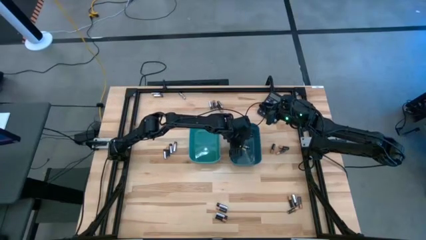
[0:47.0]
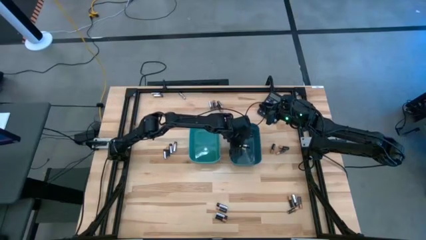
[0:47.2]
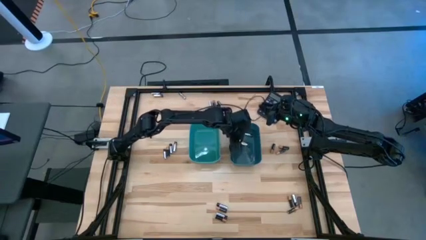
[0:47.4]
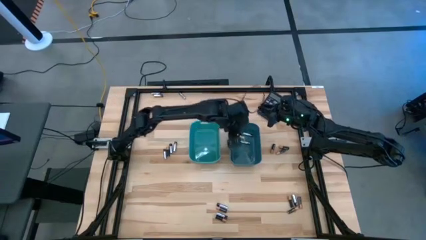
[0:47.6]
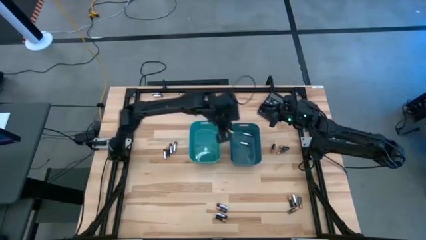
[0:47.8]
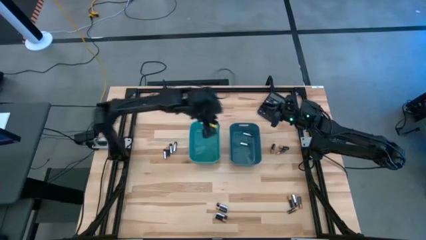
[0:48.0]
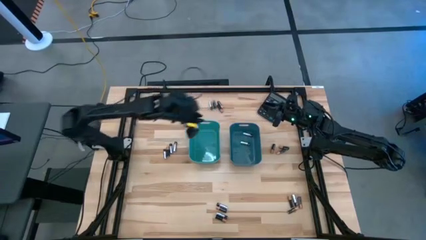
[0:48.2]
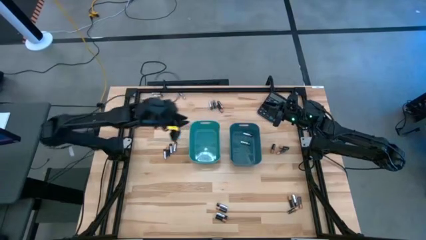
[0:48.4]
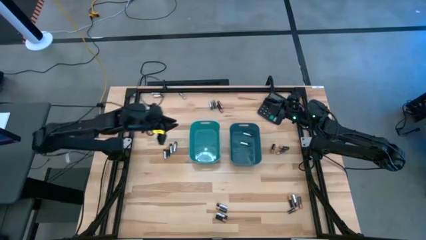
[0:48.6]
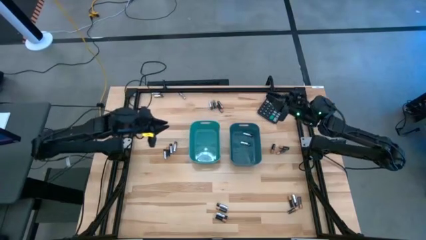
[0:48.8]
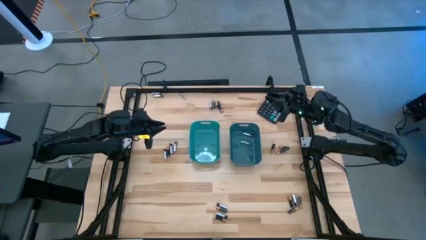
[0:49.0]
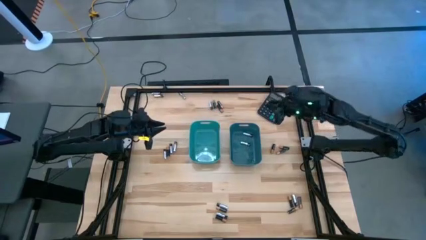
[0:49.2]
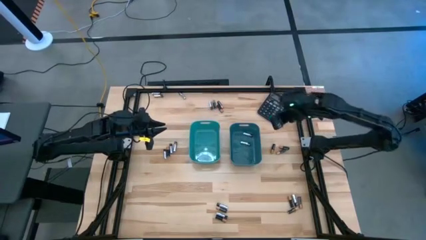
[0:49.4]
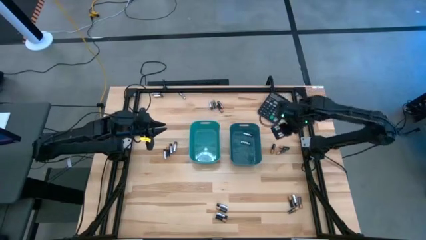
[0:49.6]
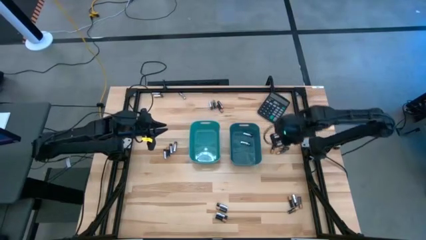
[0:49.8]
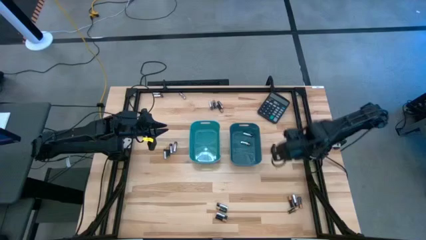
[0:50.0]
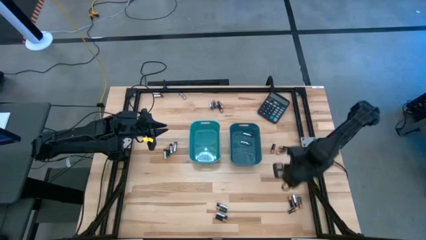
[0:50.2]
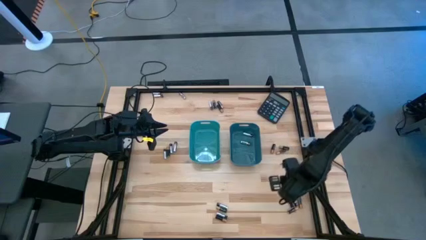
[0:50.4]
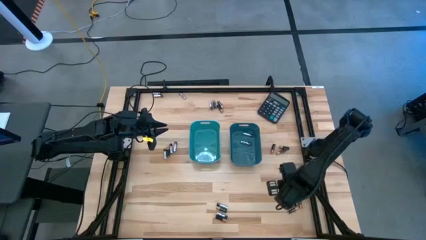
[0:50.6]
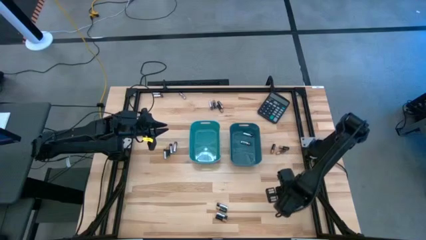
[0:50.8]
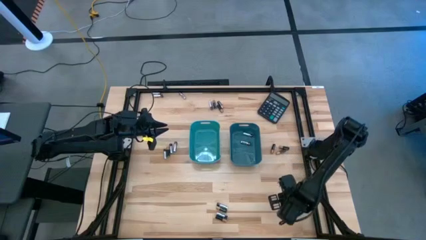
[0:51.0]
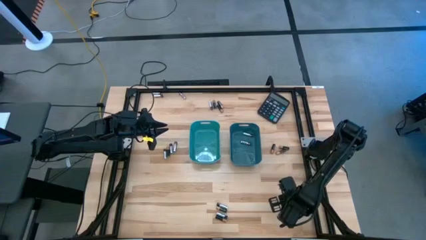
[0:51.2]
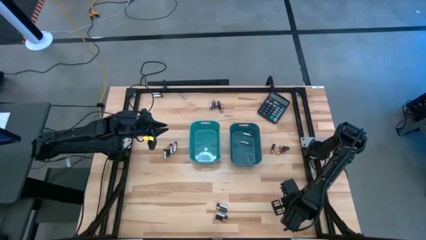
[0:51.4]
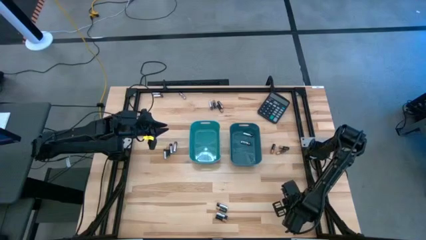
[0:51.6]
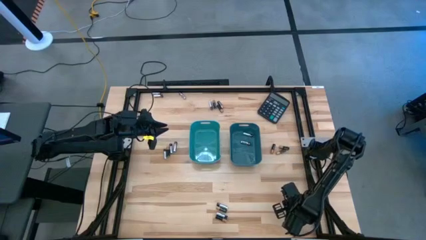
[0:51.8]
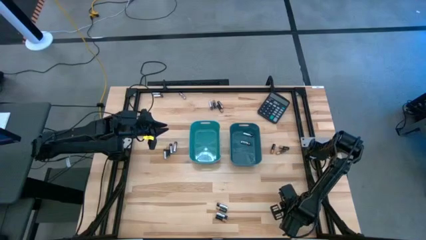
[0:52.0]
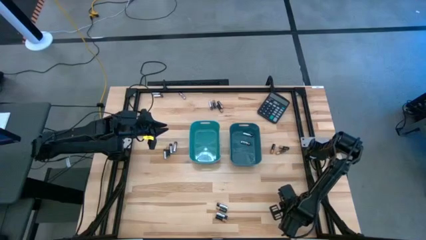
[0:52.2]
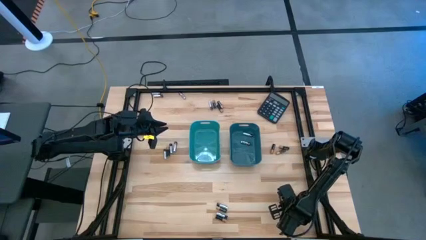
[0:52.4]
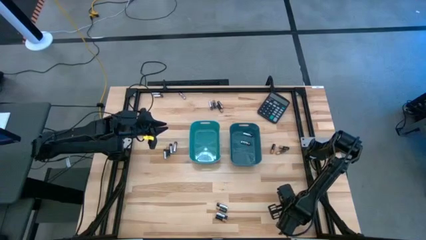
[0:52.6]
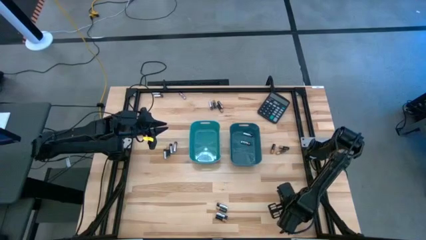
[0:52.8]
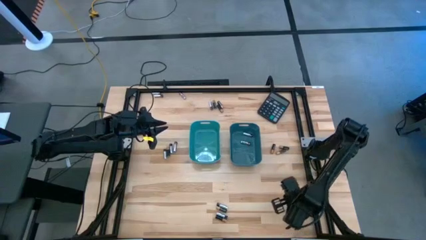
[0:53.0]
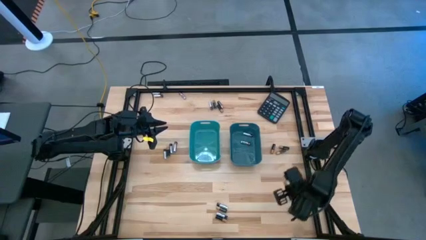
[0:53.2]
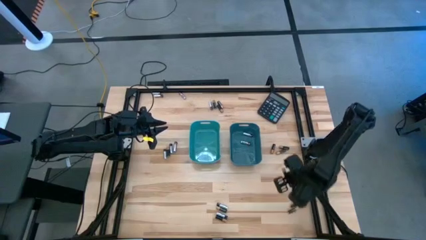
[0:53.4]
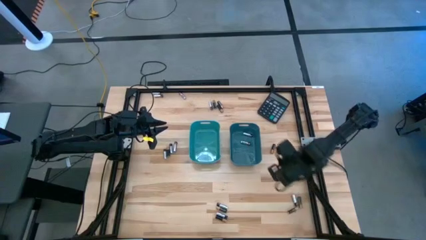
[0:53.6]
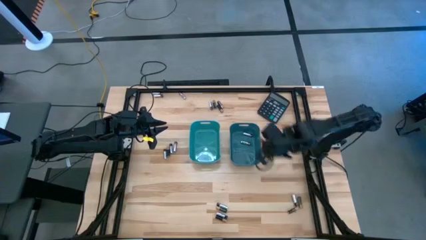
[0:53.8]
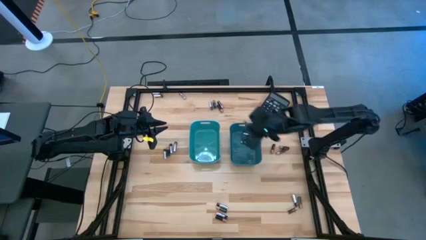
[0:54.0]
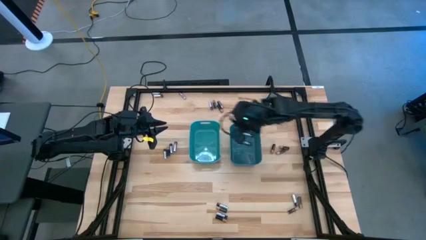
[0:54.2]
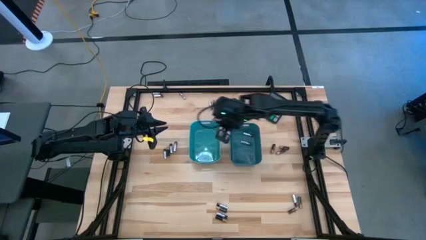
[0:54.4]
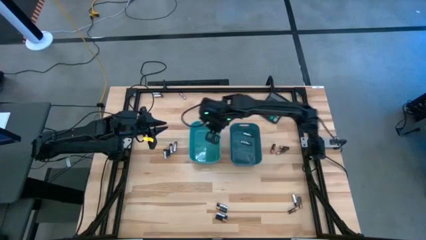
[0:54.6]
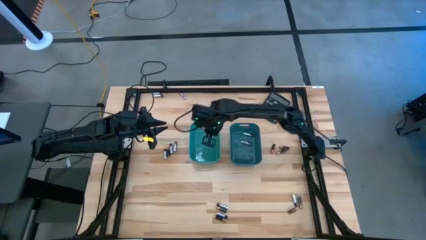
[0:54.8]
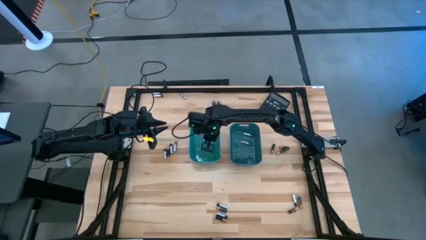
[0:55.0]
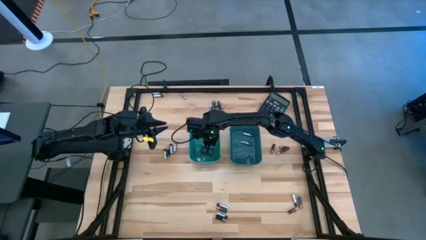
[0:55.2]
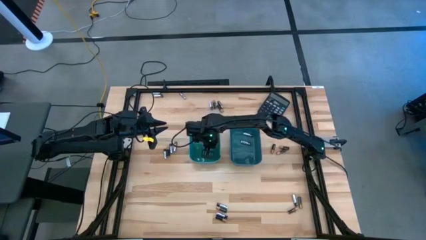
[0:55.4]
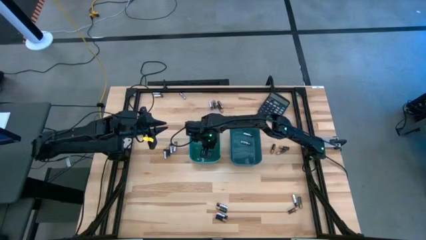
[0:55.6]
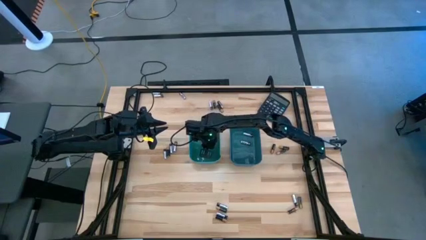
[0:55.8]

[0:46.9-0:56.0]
Task: Sort batteries
Put the black battery into the green bin

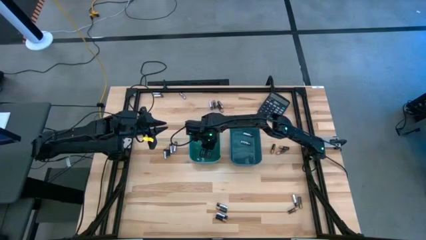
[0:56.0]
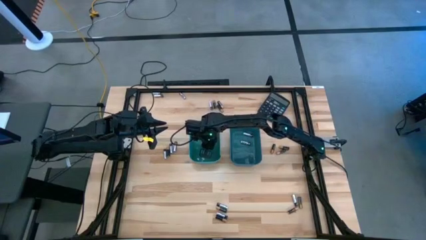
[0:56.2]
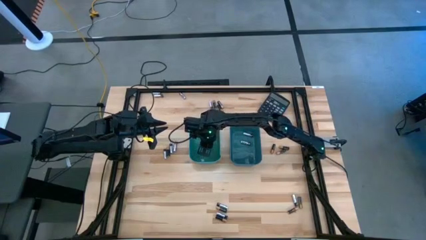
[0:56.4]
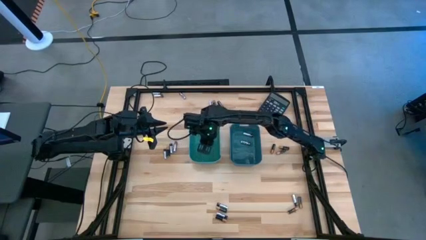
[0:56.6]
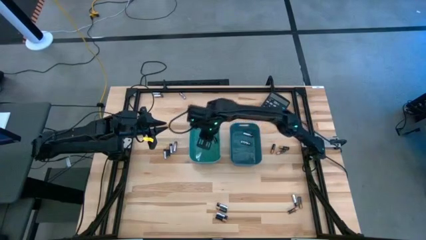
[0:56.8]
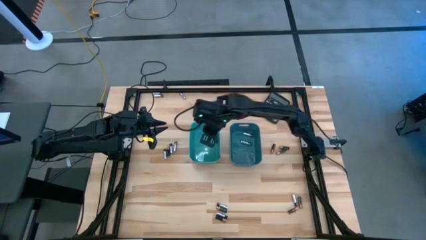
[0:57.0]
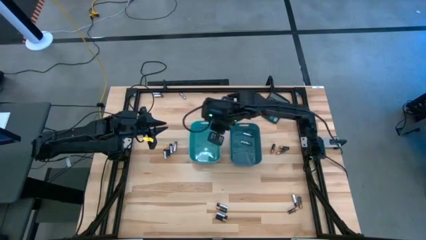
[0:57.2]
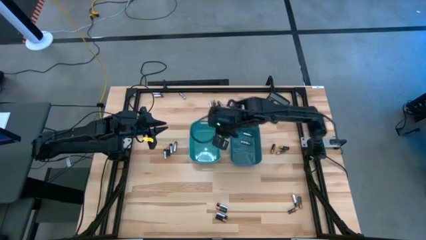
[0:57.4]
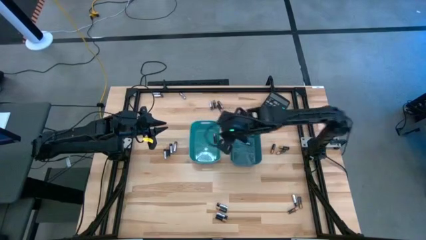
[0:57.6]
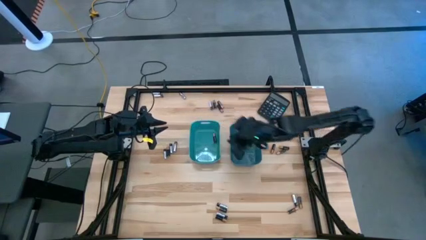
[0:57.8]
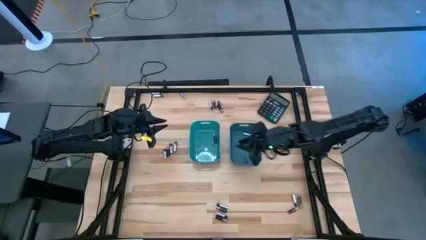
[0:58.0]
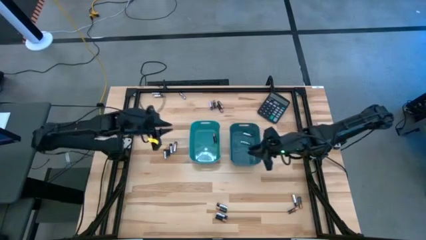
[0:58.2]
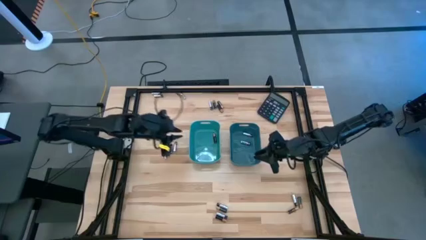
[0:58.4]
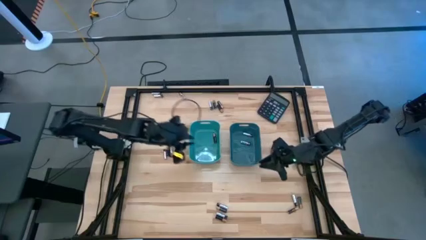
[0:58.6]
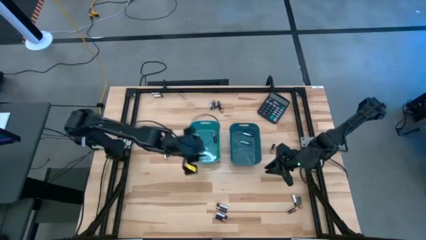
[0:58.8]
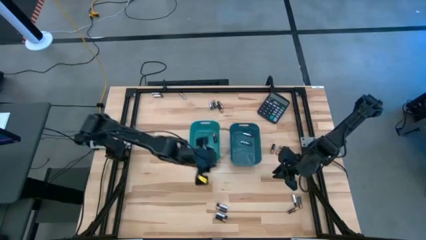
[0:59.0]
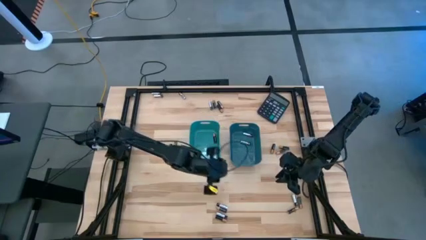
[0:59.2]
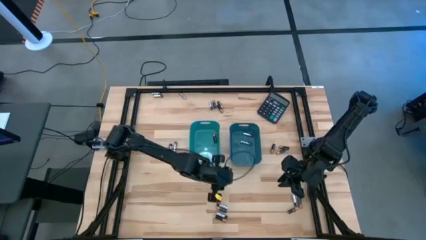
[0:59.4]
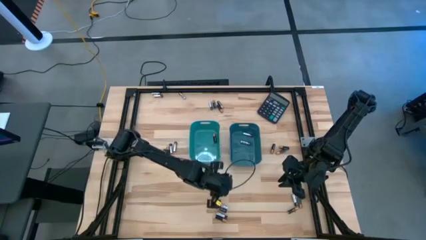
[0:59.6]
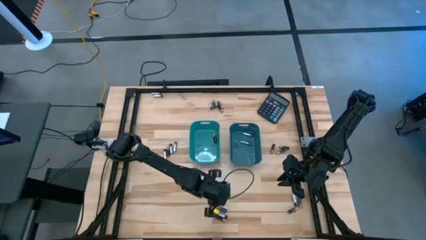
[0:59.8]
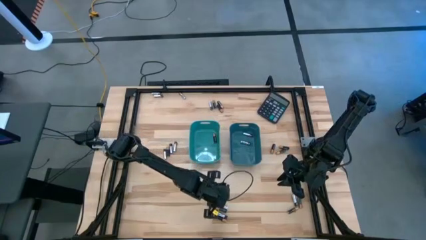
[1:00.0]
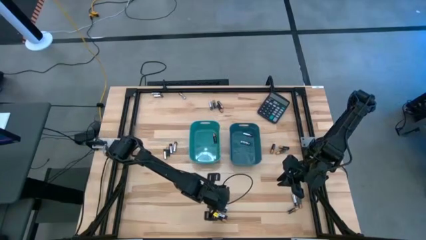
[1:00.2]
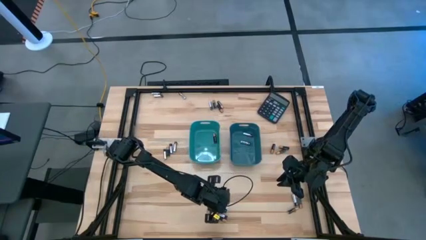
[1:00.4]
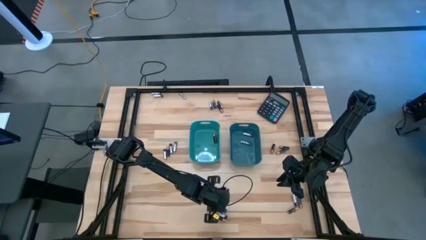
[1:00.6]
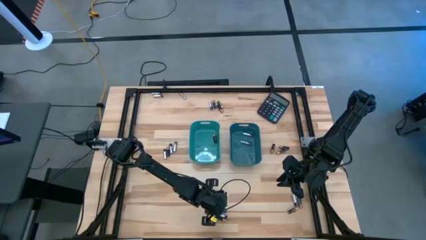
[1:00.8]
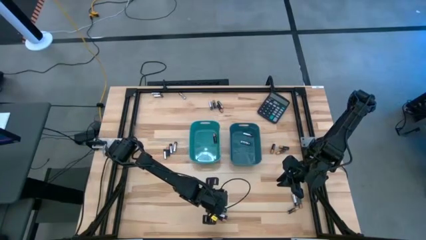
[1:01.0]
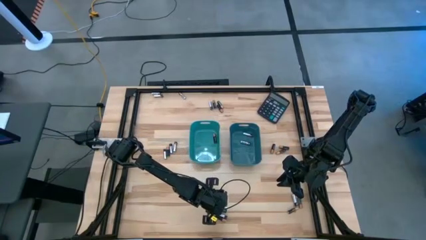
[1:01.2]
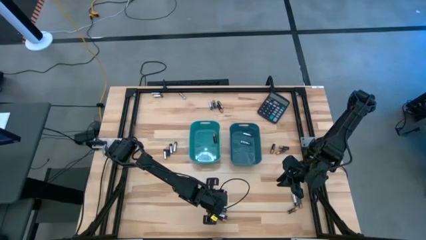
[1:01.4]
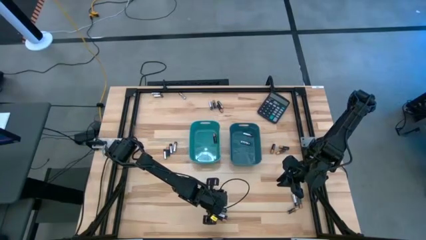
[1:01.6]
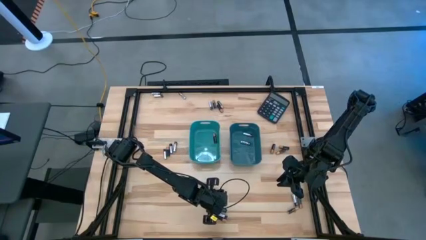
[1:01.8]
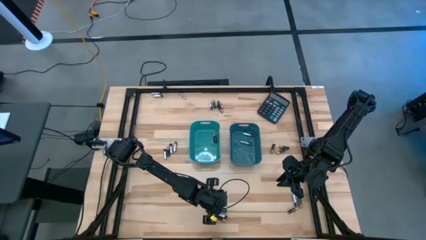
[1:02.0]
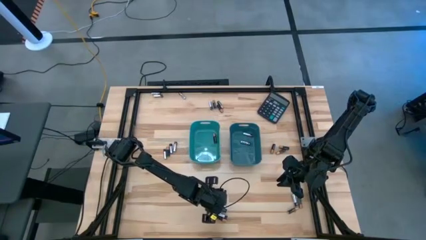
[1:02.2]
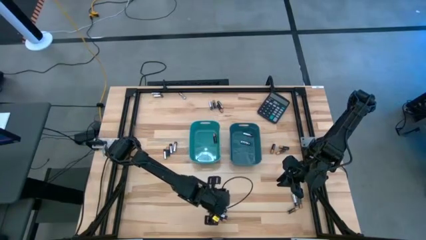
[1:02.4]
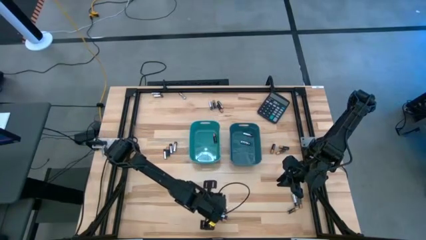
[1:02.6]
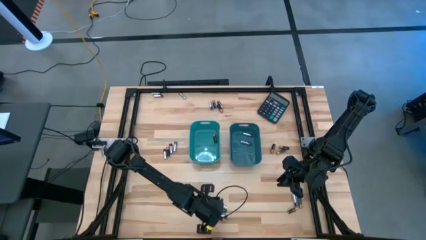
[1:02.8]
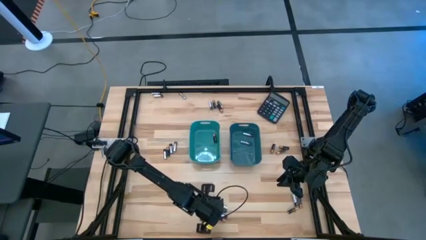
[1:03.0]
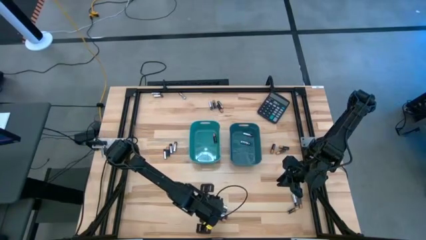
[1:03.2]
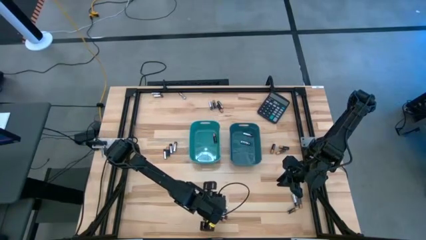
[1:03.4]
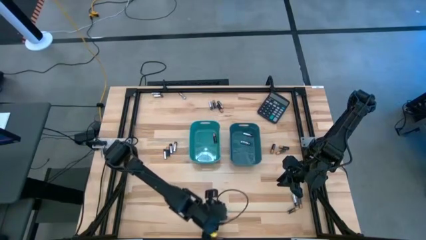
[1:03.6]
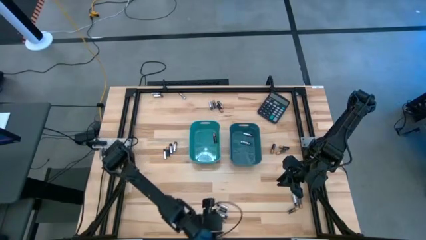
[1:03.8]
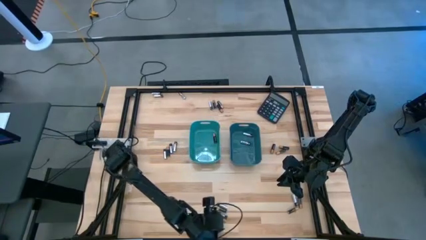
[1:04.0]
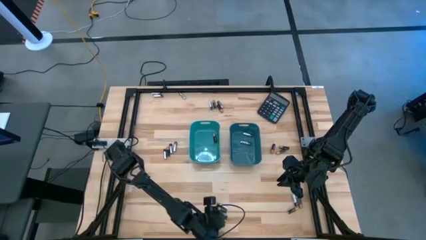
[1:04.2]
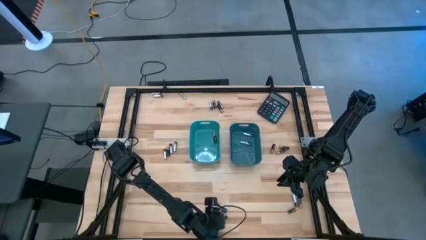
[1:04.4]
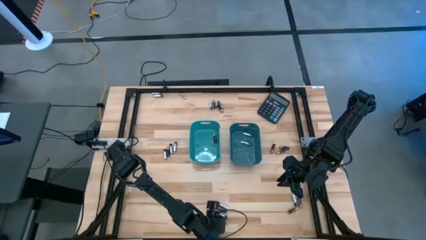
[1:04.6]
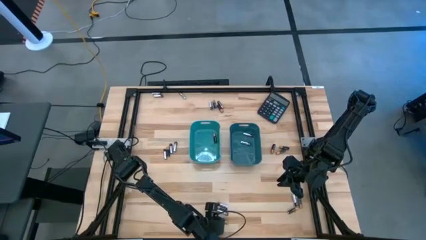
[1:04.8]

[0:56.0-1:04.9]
Put the black battery into the green bin
